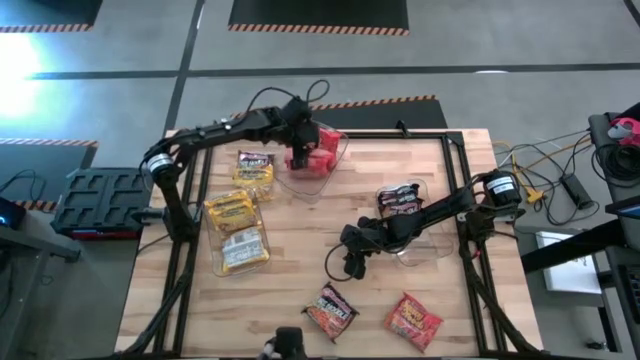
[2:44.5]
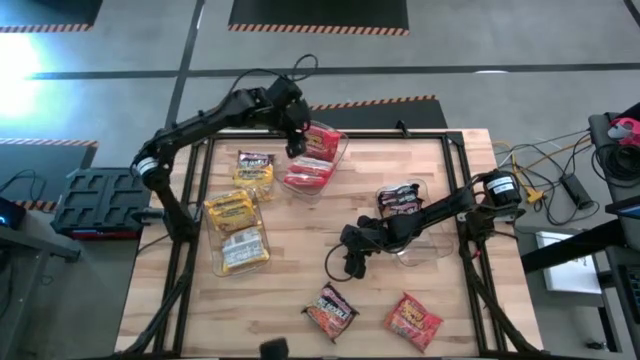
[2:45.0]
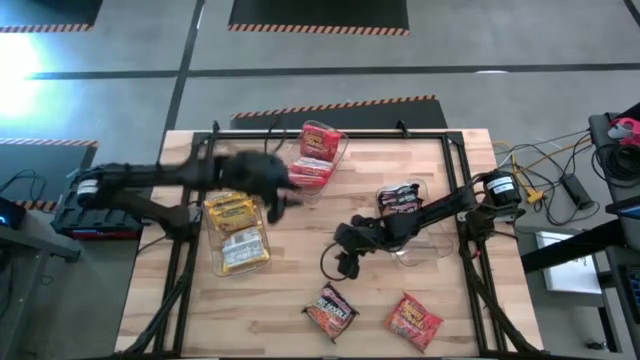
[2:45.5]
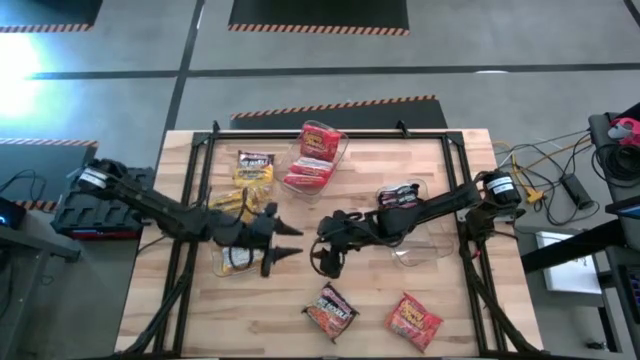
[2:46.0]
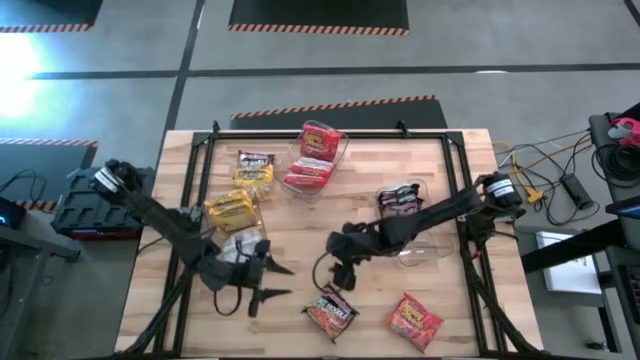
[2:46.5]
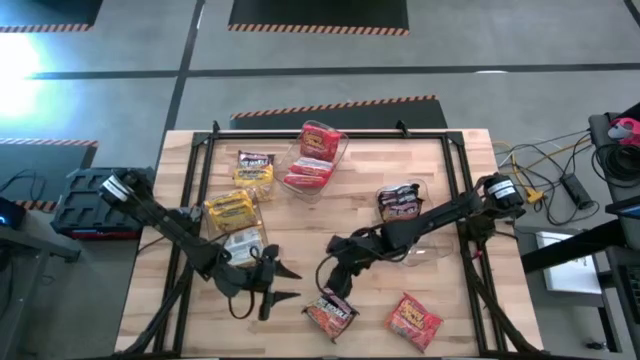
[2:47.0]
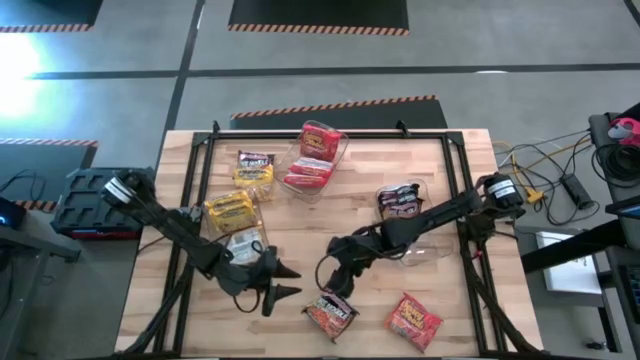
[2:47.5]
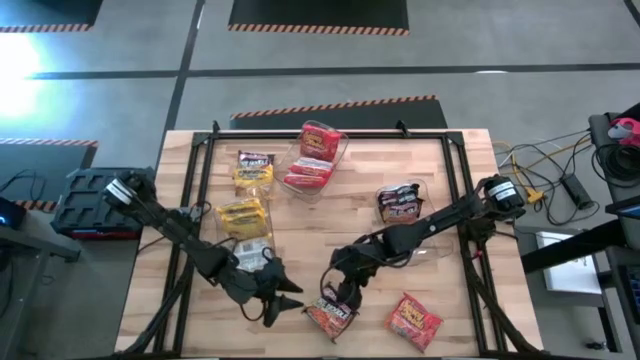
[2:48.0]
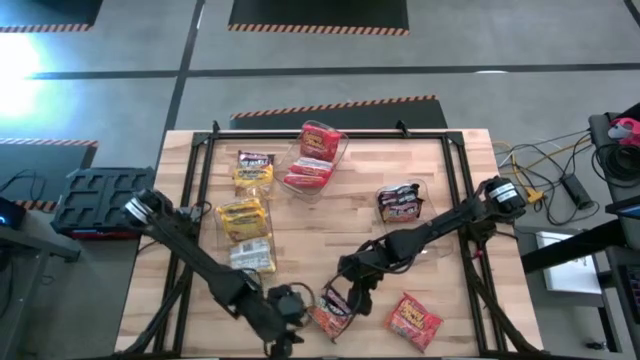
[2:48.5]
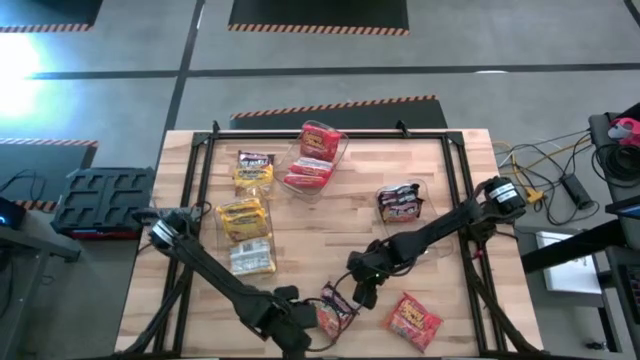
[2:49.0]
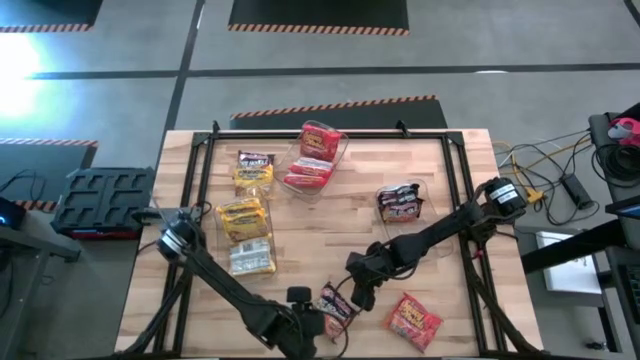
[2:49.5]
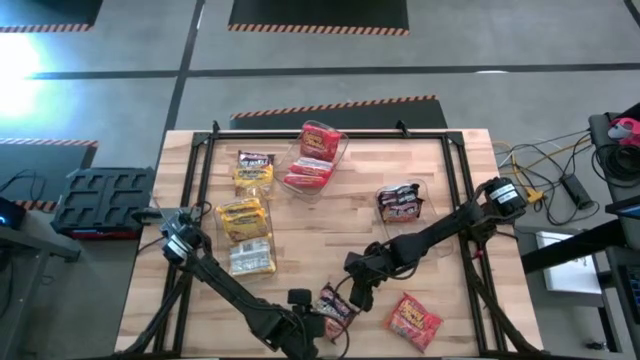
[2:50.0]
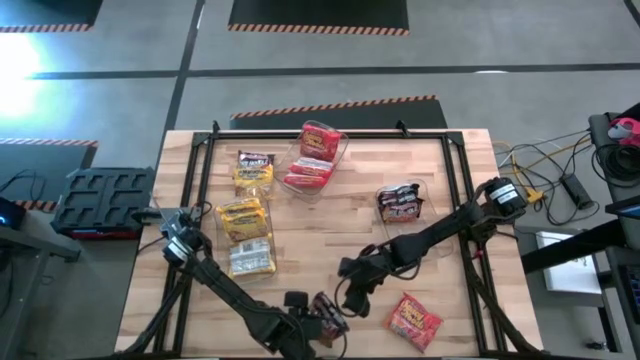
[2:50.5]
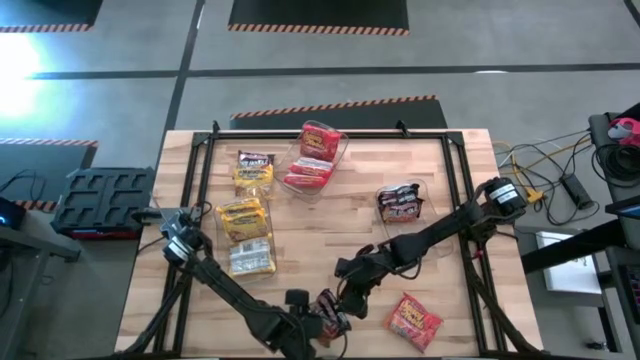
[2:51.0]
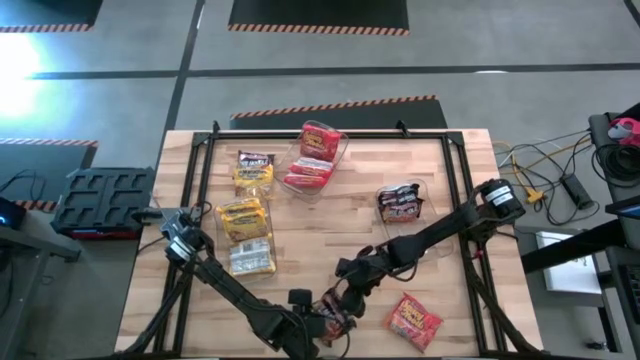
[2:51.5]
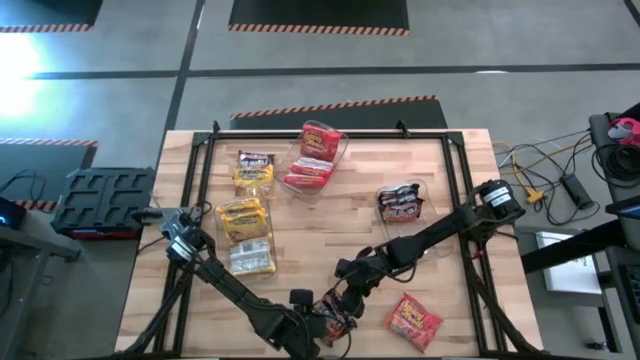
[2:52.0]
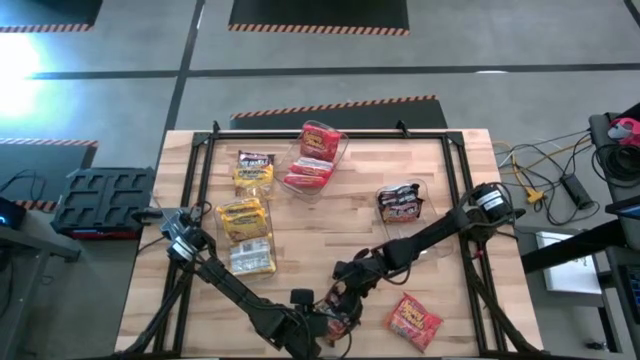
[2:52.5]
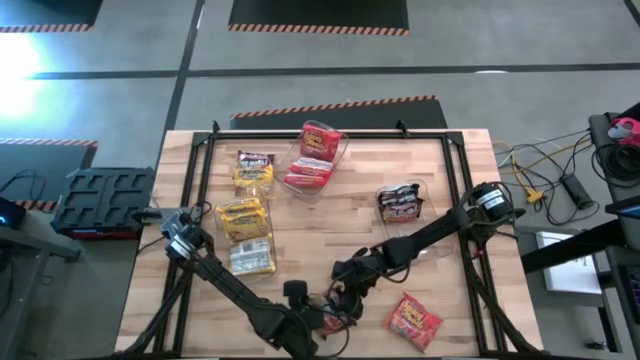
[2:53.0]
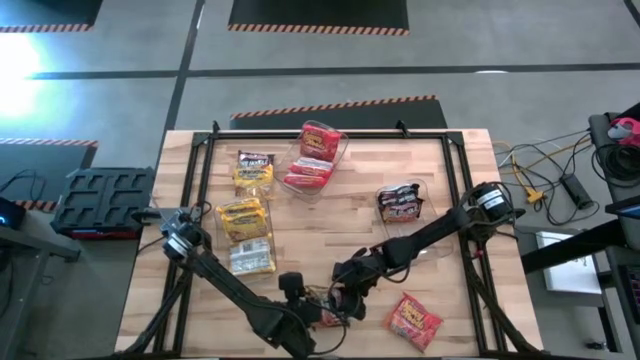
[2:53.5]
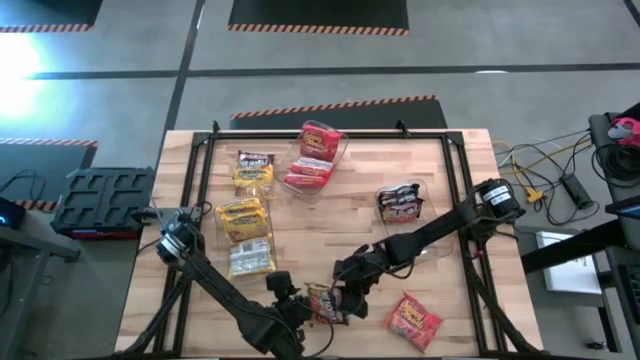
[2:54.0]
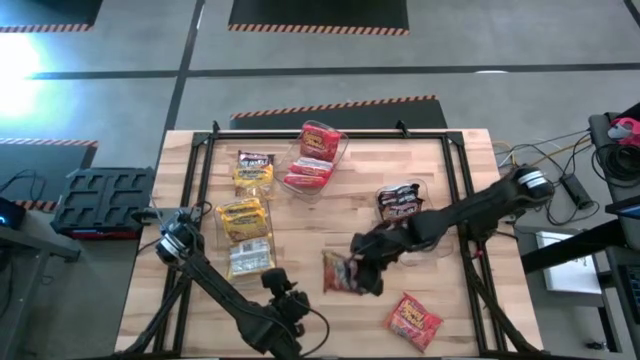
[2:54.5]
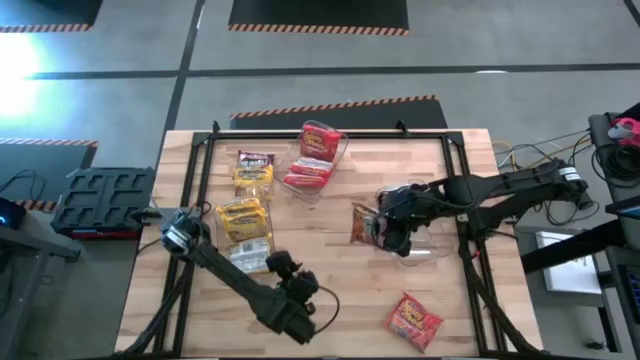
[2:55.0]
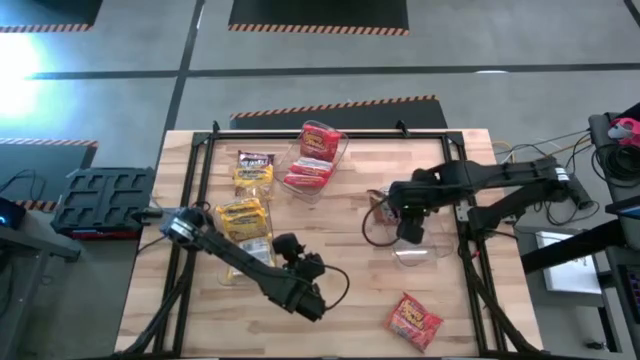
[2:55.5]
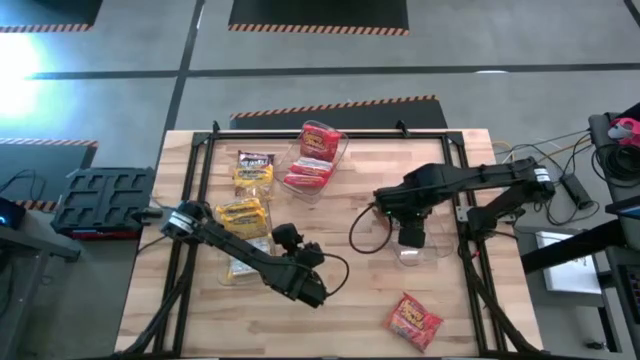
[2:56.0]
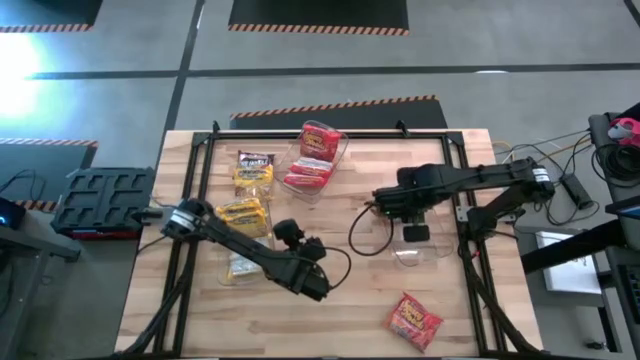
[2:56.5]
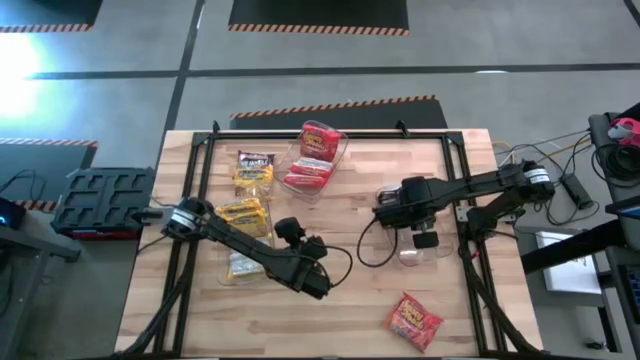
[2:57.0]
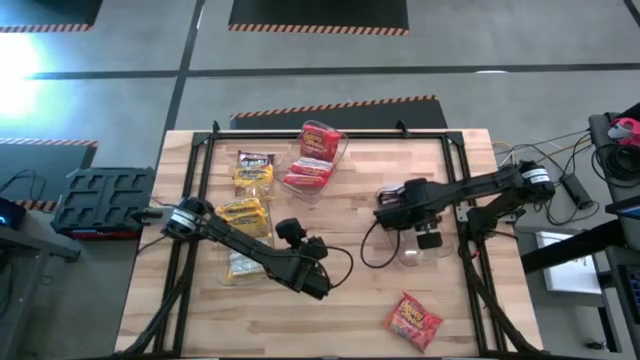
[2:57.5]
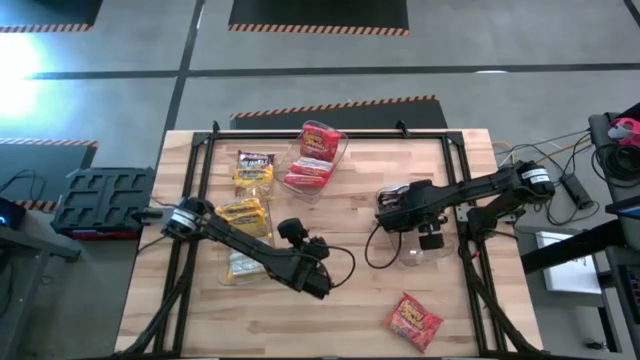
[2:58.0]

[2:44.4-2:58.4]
Task: Sort Maruchan noodles
Put the bottom black pack noodle into the bottom right transparent bin

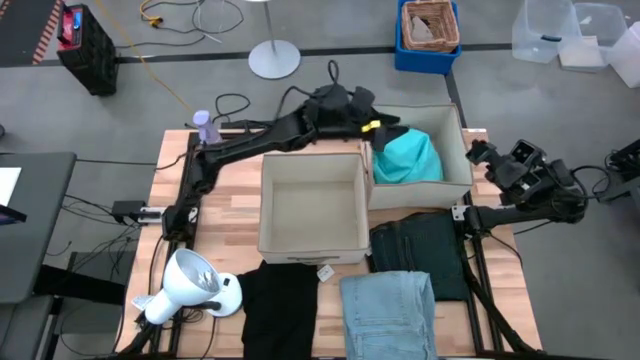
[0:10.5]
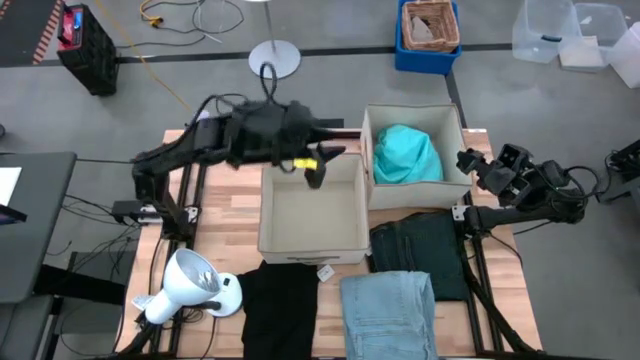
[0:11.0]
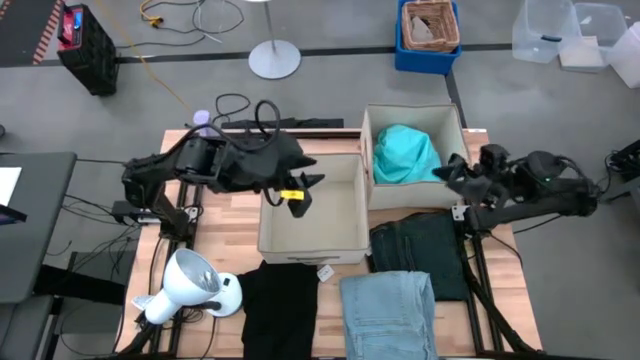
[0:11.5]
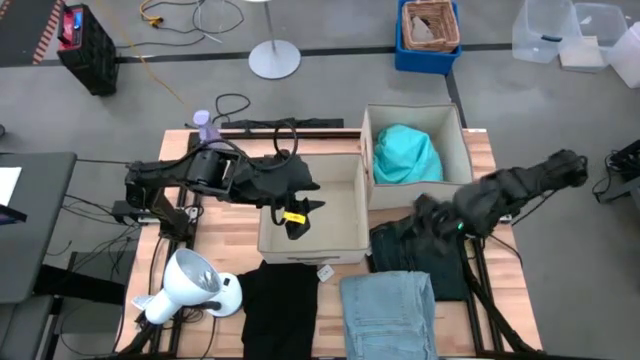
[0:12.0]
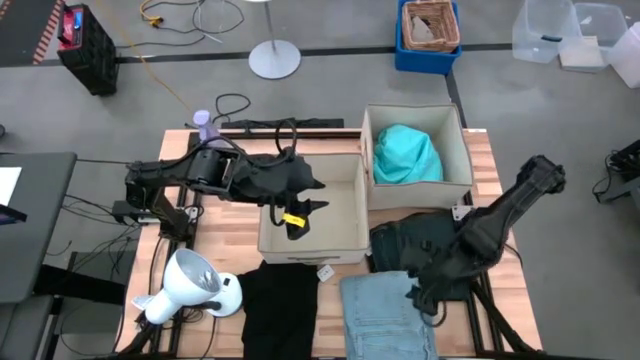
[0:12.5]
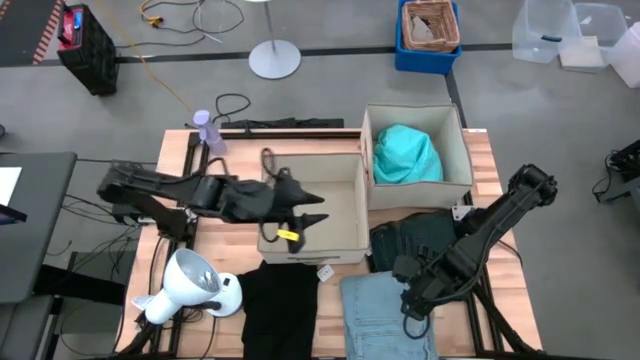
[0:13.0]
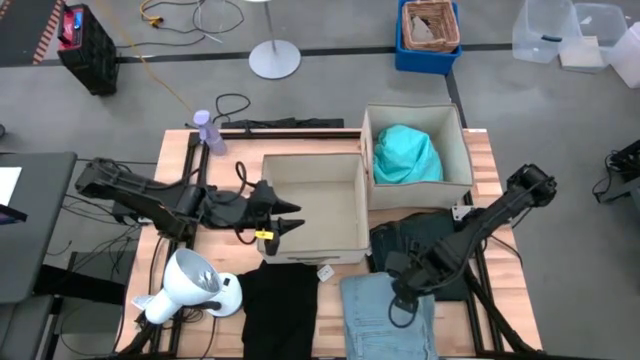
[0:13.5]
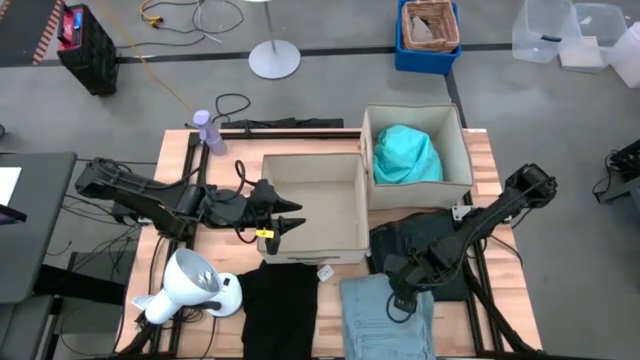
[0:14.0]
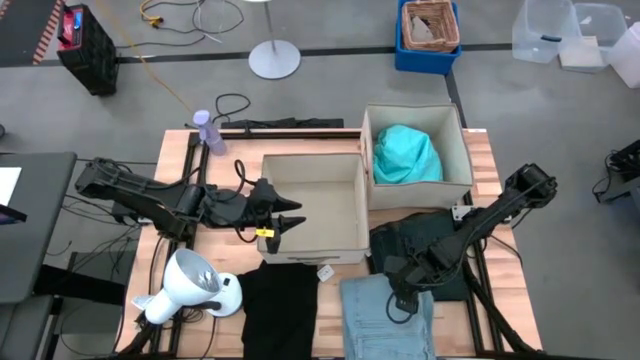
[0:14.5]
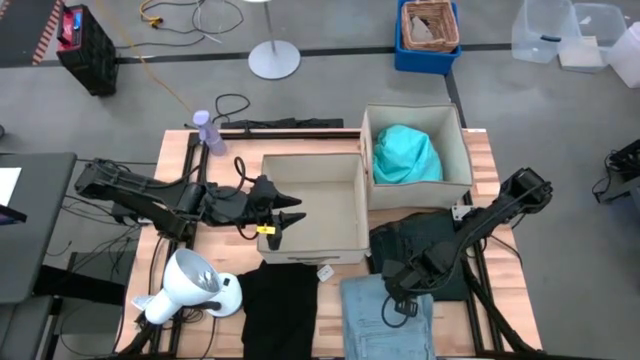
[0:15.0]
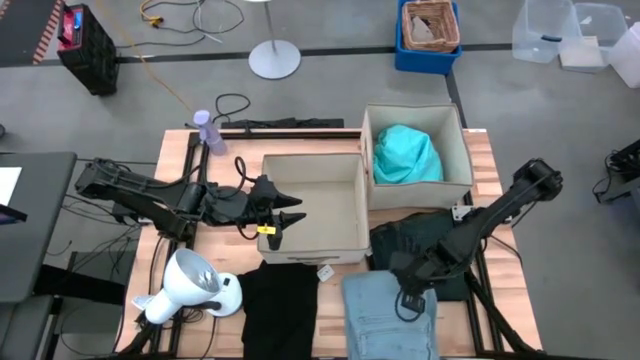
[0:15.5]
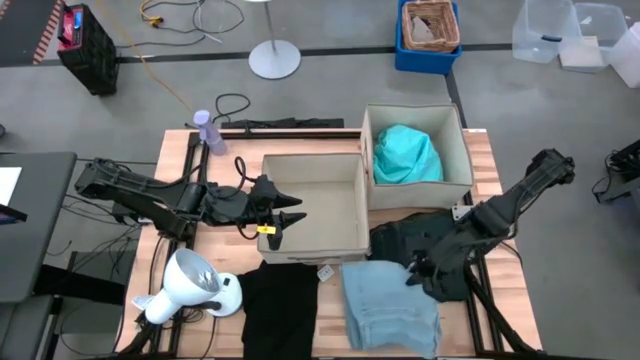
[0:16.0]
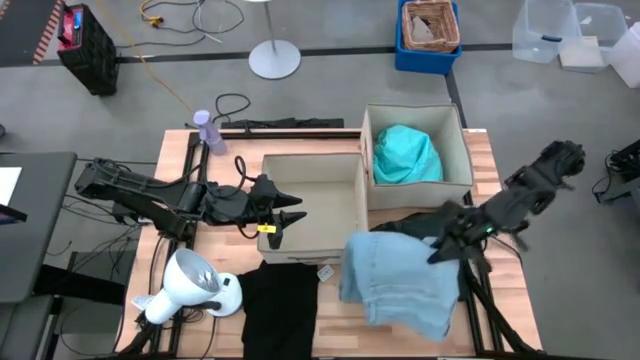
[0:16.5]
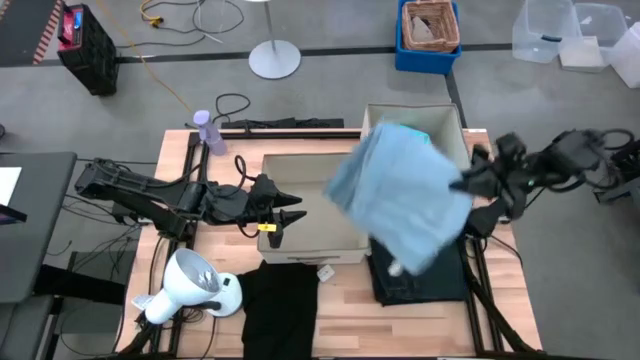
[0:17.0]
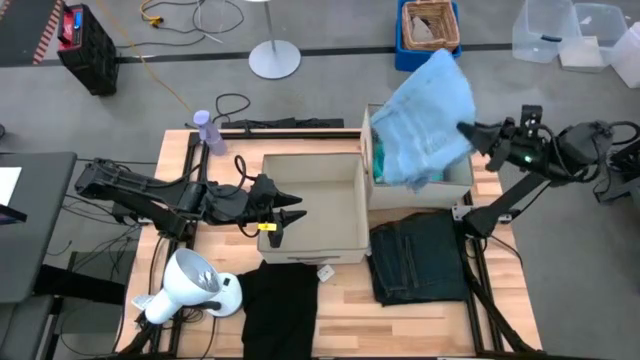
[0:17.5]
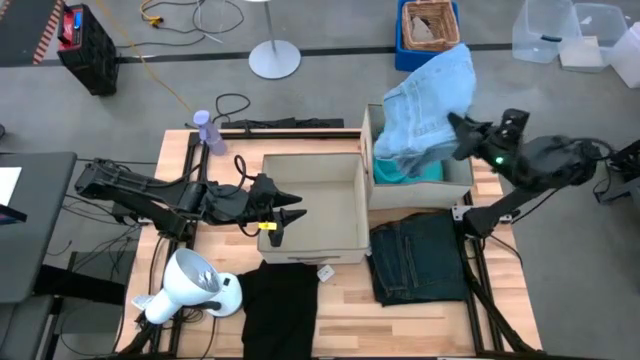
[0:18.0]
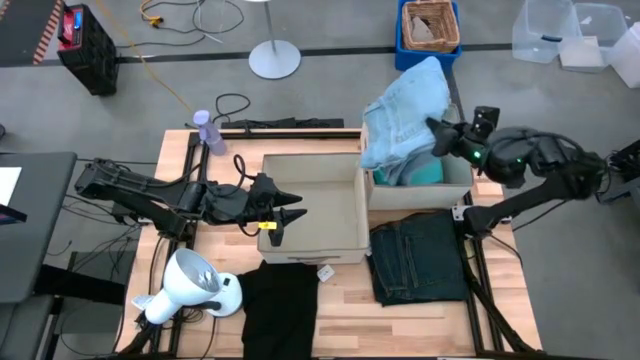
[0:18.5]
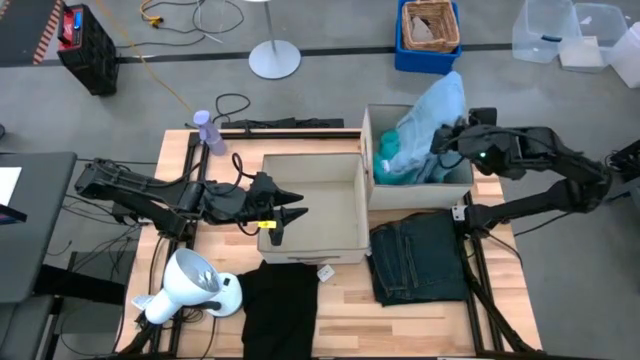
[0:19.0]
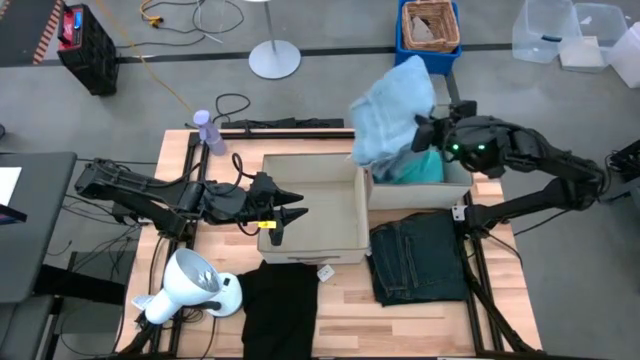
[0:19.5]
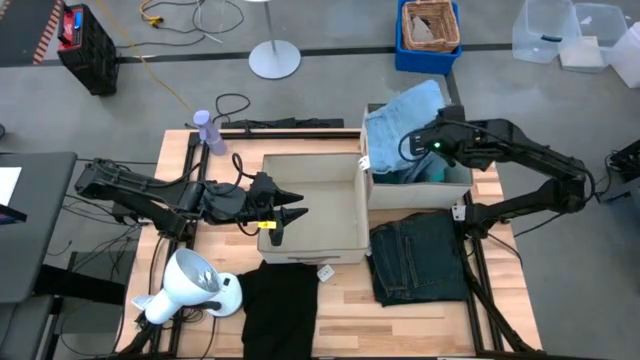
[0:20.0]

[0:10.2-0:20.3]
Task: Sort clothes
Put the light blue jeans in the right brown bin
